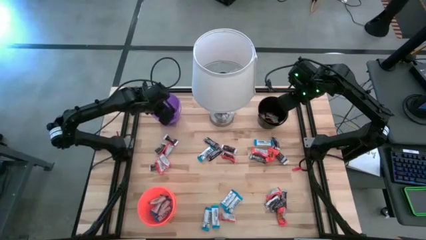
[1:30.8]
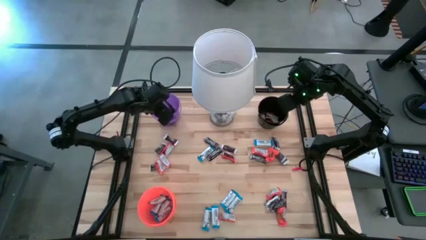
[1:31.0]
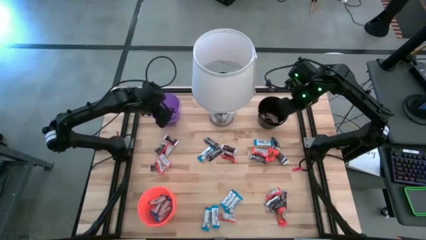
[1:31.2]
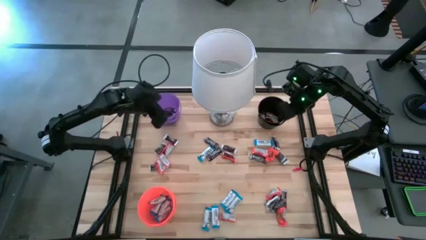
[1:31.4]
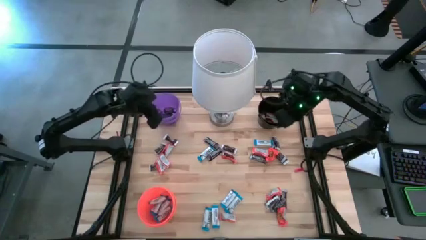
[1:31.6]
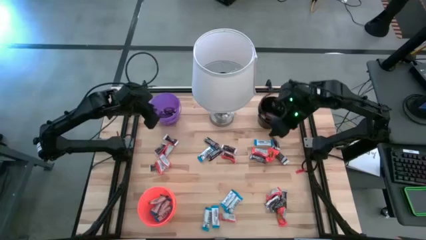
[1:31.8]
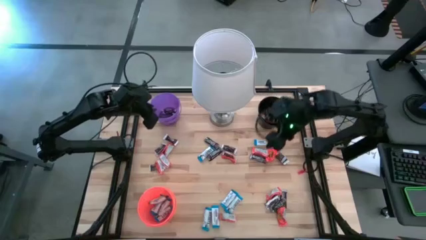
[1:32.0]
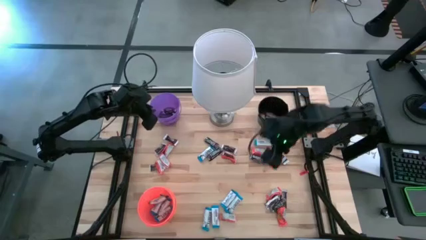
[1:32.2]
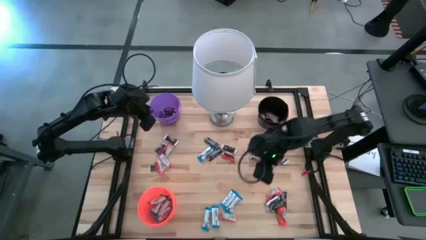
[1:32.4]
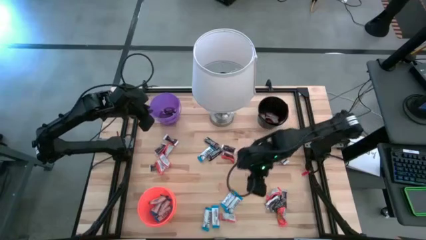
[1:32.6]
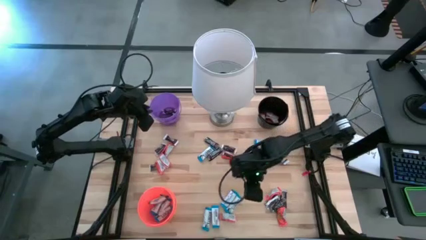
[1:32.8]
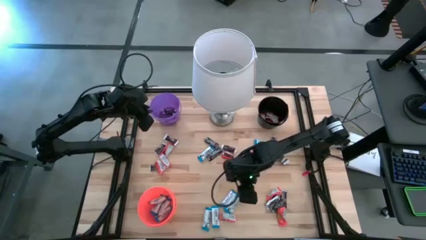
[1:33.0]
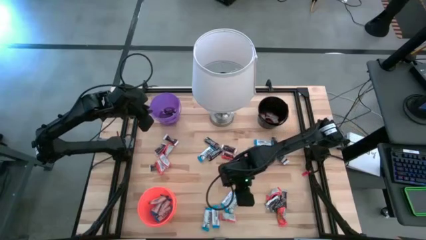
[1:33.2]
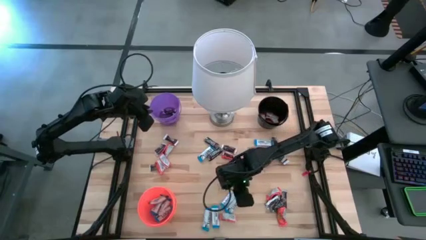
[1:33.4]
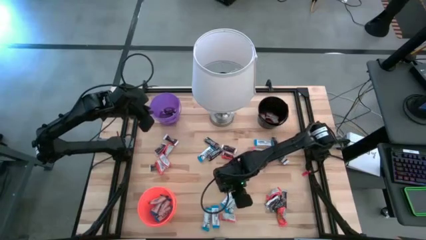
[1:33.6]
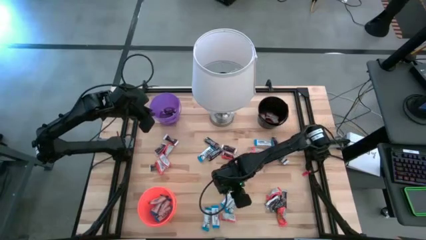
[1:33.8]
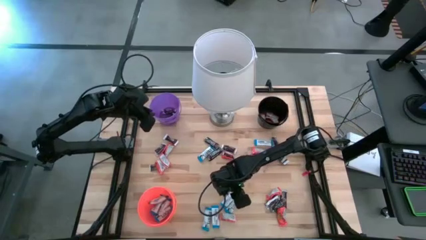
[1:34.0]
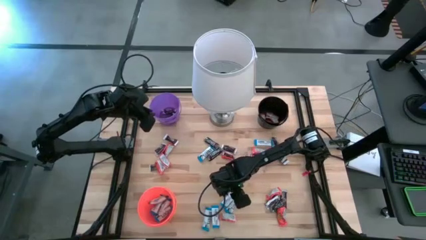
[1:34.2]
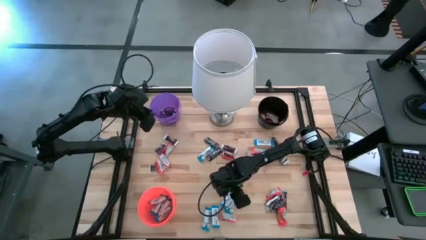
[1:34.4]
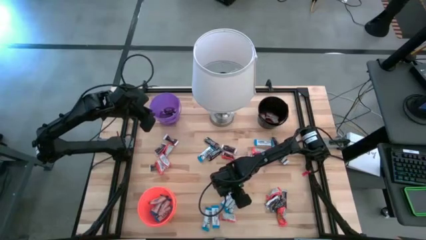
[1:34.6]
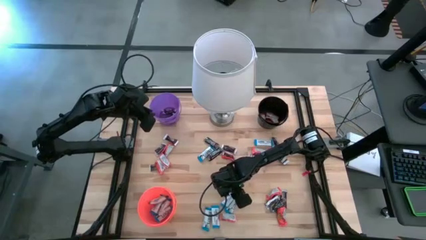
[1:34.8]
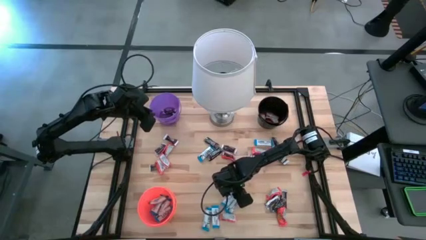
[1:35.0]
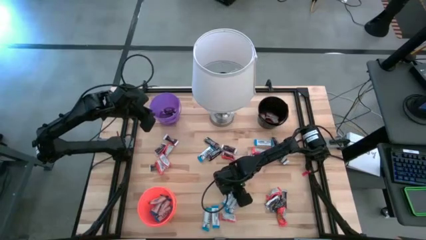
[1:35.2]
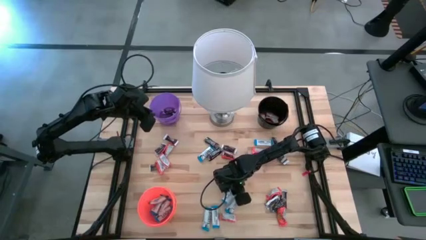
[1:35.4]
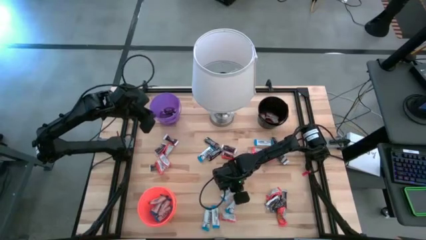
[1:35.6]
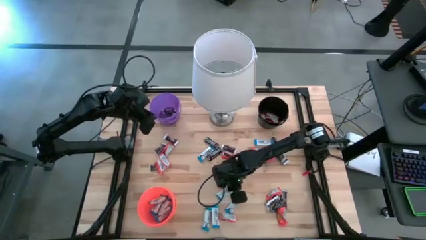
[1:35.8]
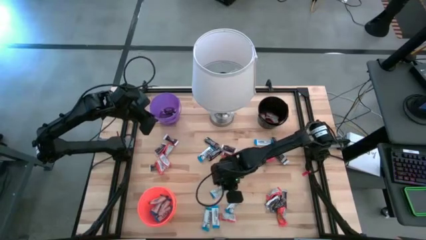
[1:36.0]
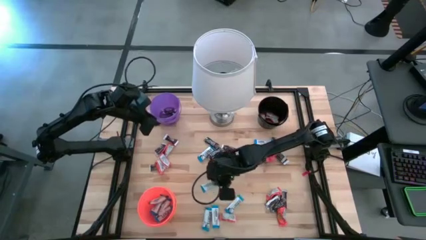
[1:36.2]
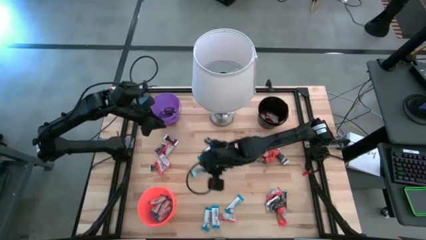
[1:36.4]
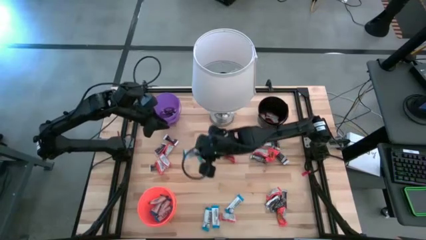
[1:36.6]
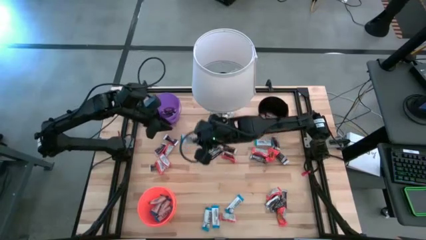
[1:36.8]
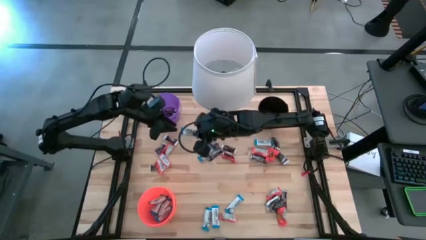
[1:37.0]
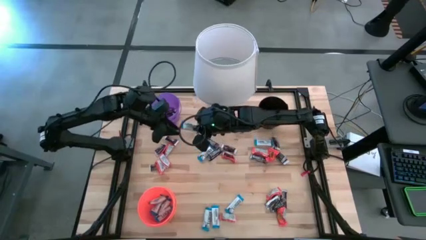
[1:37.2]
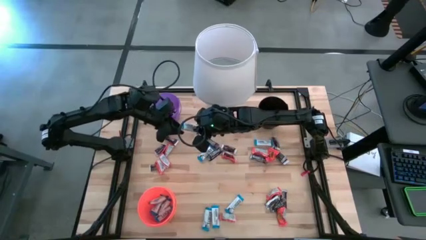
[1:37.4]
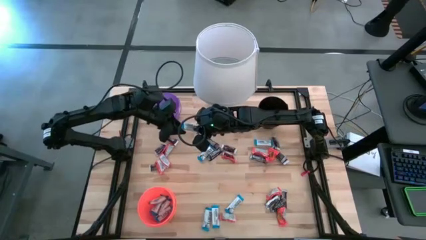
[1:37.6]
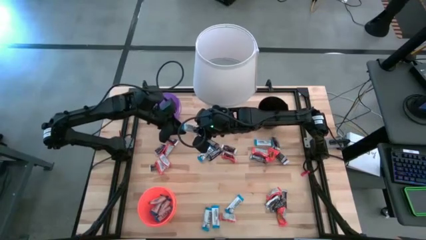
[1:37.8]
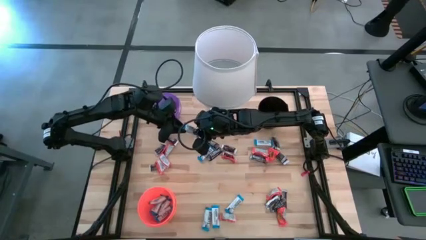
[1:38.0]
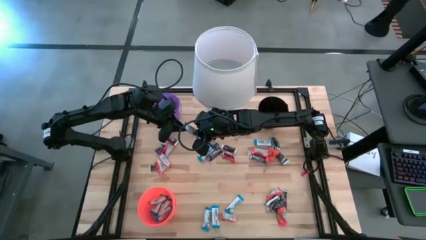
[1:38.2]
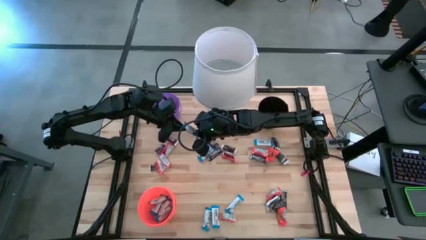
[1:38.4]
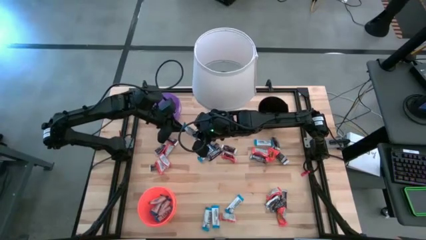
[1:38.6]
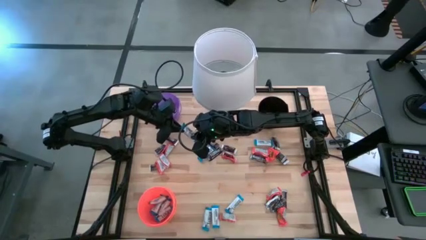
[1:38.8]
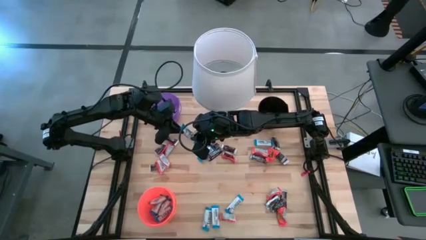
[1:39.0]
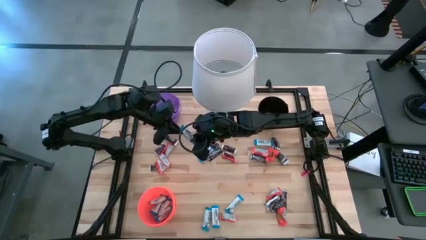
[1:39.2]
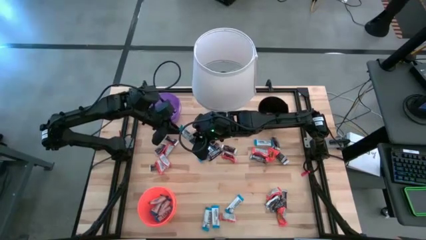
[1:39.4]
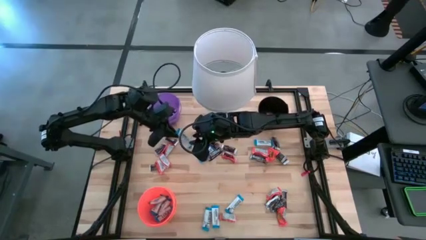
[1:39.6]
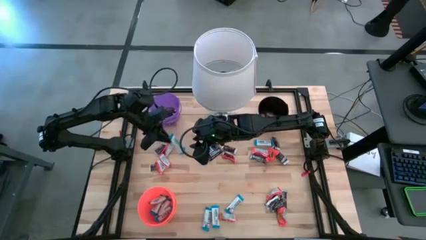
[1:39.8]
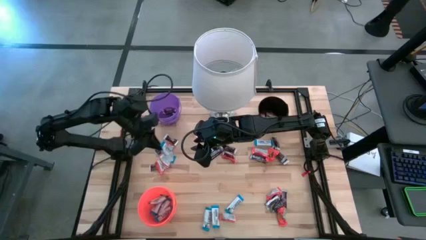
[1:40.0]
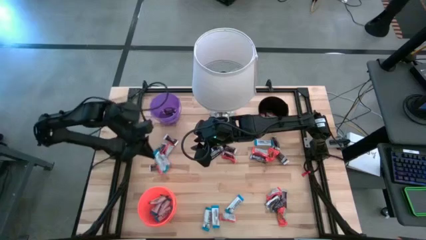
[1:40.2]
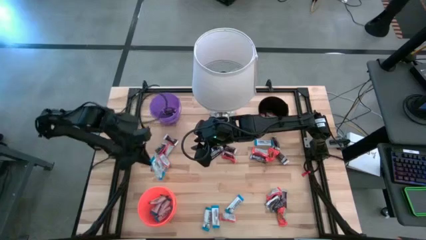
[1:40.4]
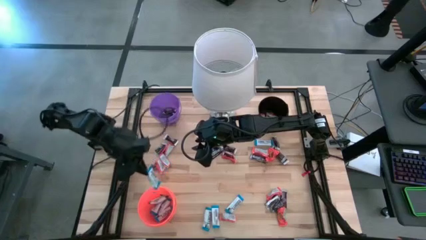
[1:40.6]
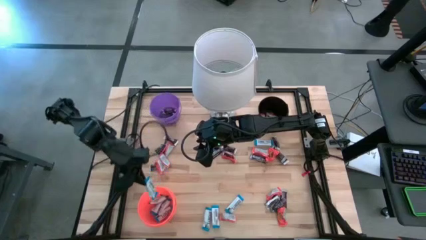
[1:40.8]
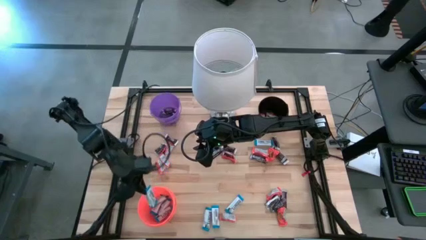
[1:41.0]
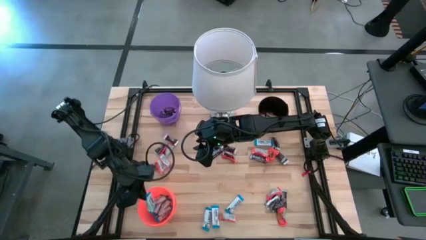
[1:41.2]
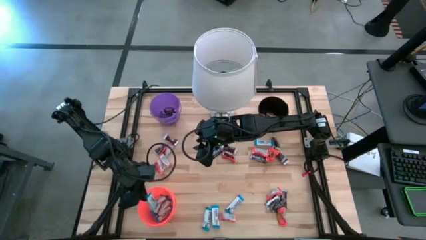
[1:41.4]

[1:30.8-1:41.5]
Task: Organize candy in baskets
Put the white chocolate bar into the orange bucket

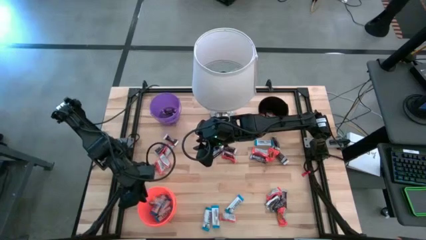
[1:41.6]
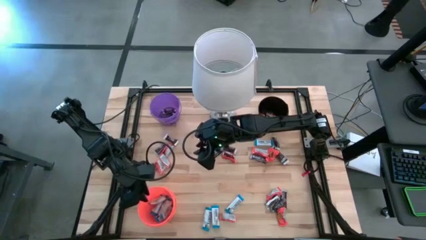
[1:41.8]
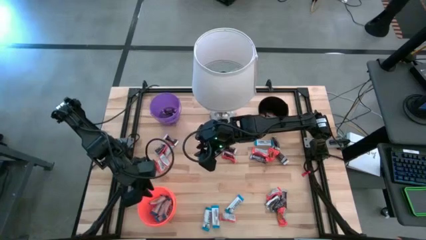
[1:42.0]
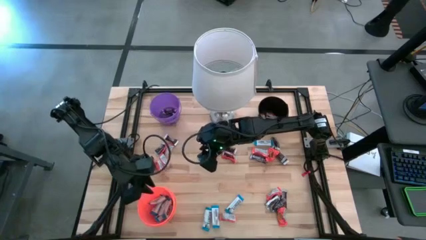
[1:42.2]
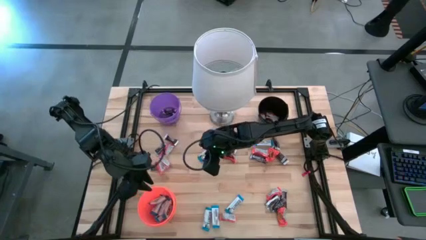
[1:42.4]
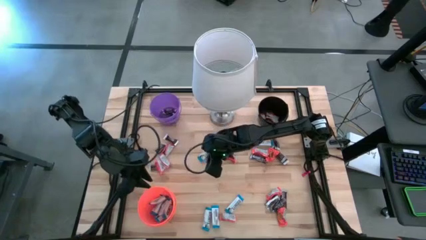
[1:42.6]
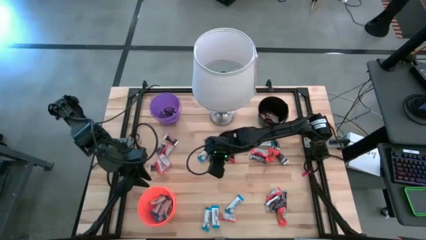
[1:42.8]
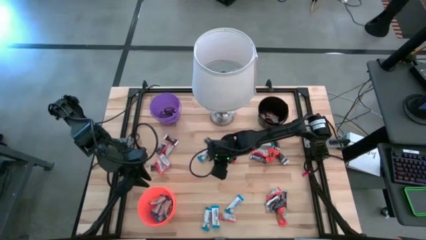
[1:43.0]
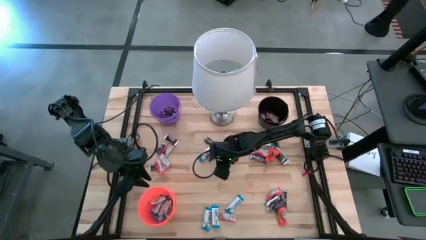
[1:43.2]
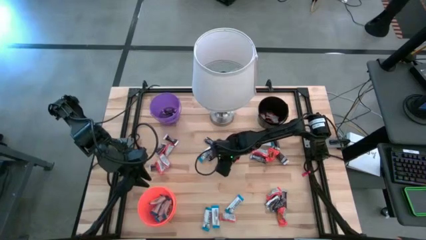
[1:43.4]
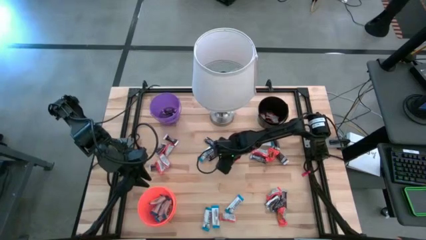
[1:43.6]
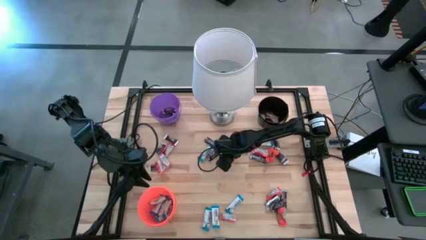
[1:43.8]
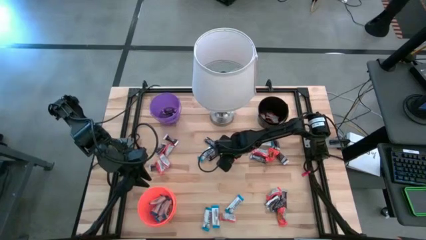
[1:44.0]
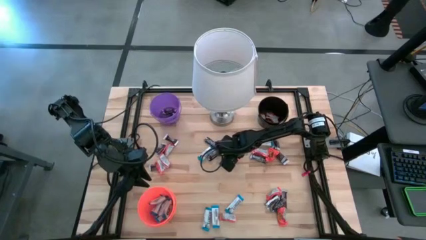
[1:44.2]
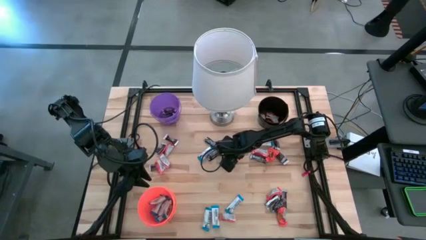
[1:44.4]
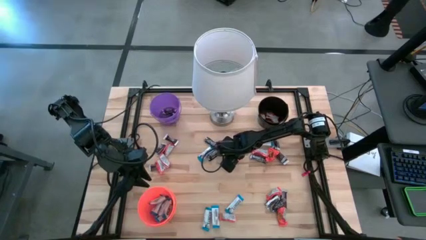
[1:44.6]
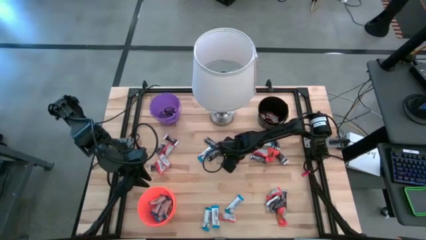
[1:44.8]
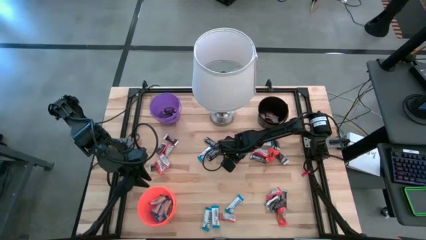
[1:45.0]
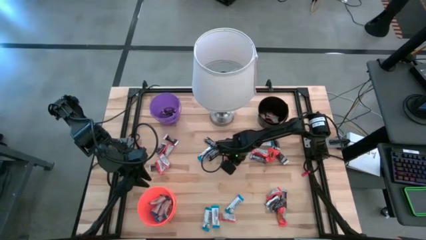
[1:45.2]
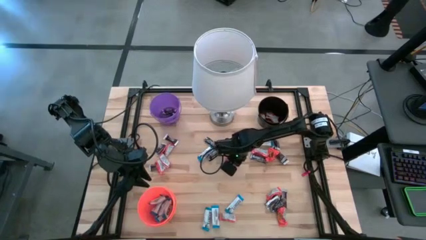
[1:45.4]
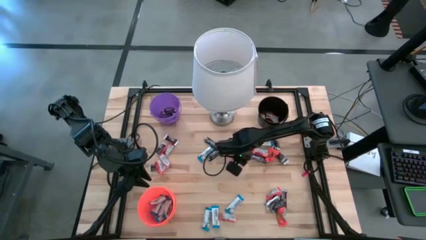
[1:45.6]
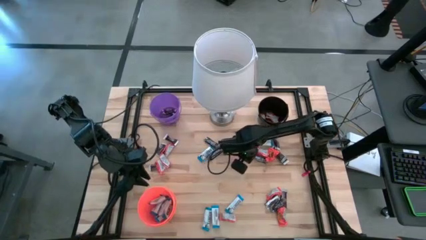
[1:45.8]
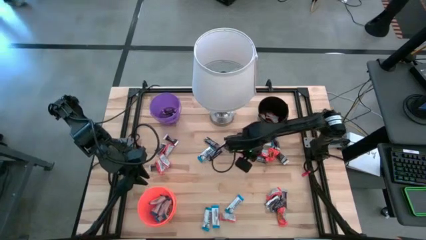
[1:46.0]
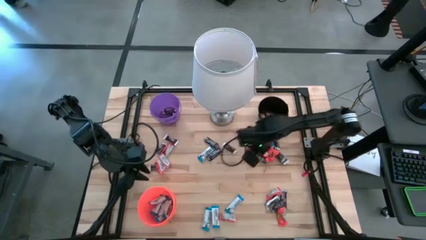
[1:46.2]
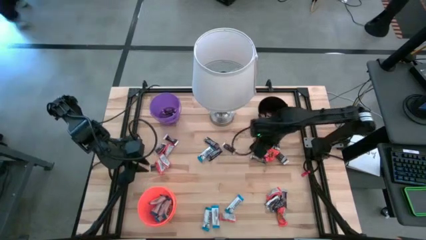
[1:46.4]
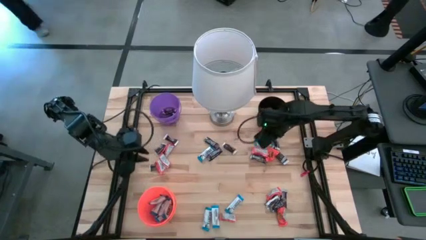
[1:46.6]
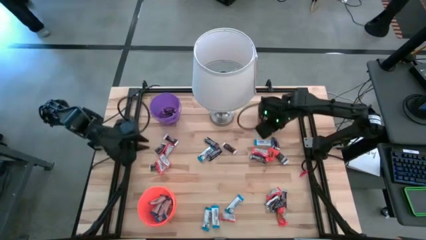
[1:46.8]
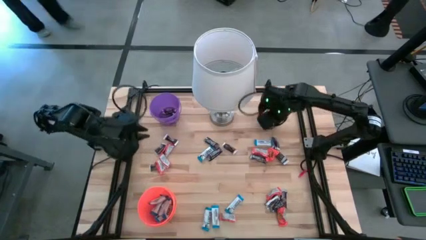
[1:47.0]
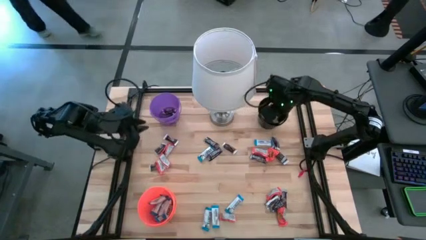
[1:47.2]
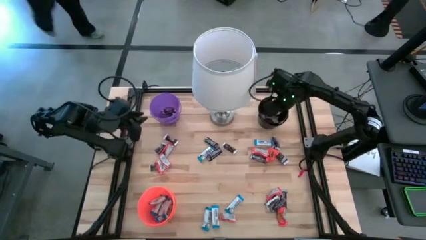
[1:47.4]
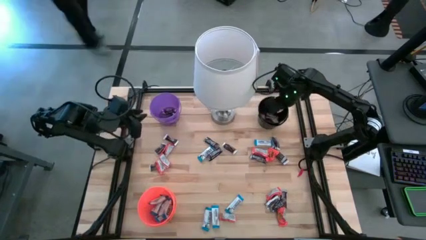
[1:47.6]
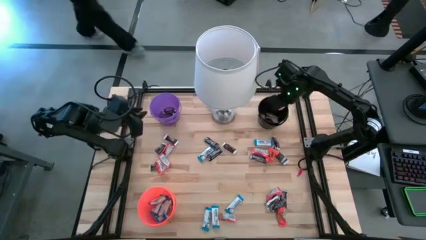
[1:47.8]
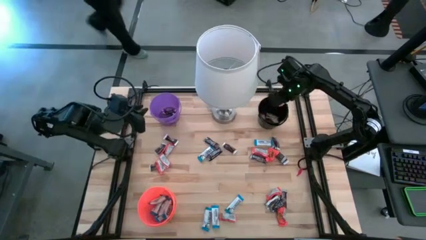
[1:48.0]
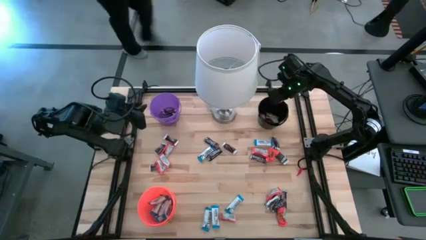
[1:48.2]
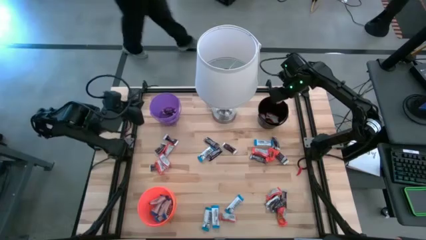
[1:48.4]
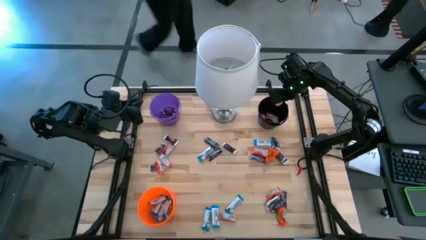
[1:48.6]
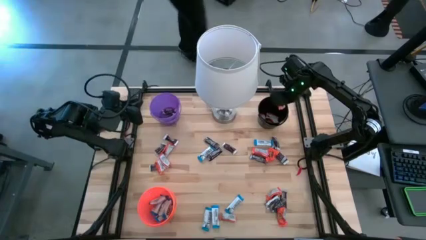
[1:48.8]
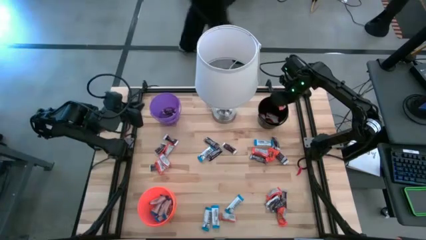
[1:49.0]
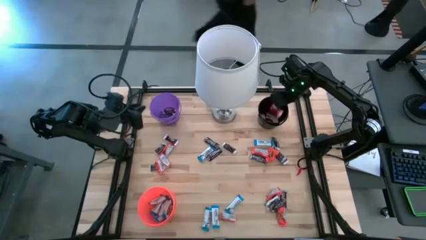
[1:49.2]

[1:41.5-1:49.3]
Put the orange chocolate bar into the black bucket
